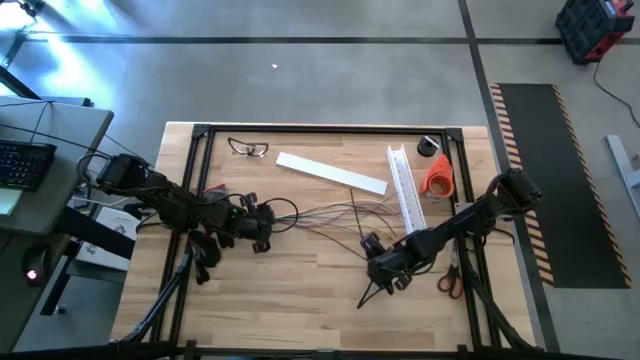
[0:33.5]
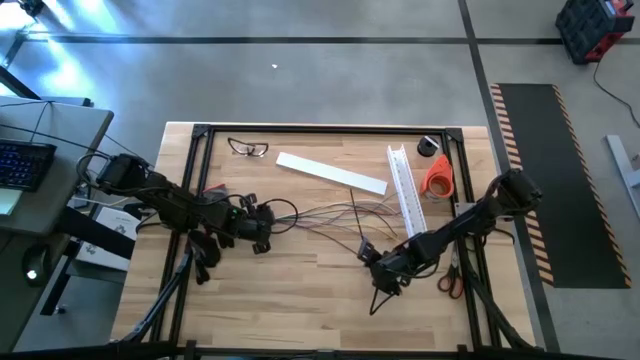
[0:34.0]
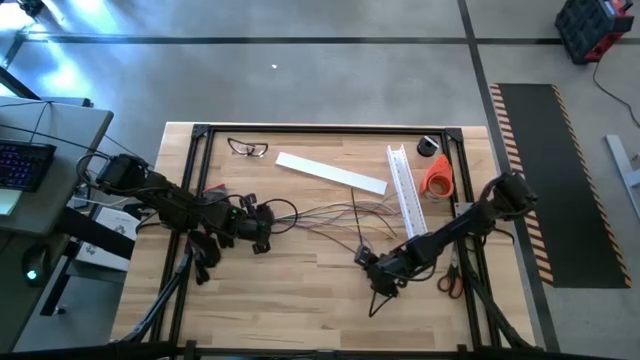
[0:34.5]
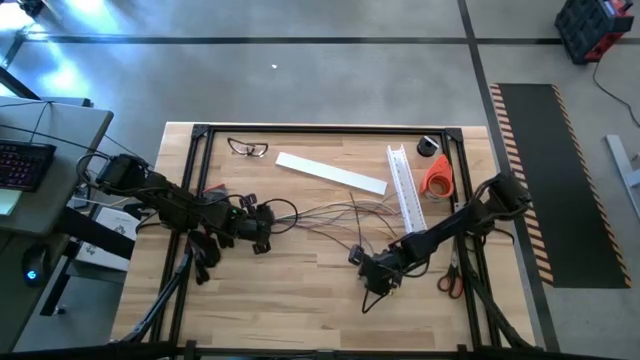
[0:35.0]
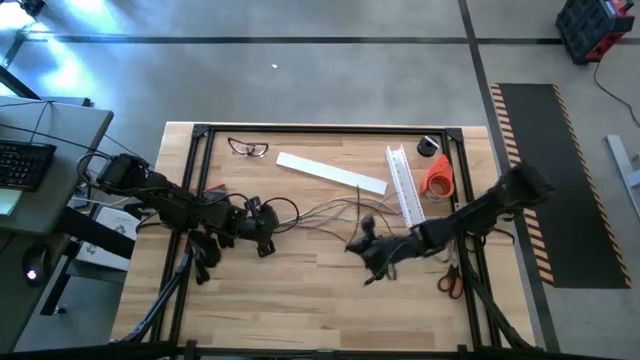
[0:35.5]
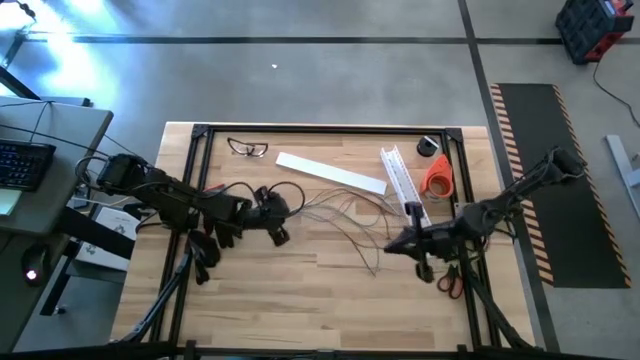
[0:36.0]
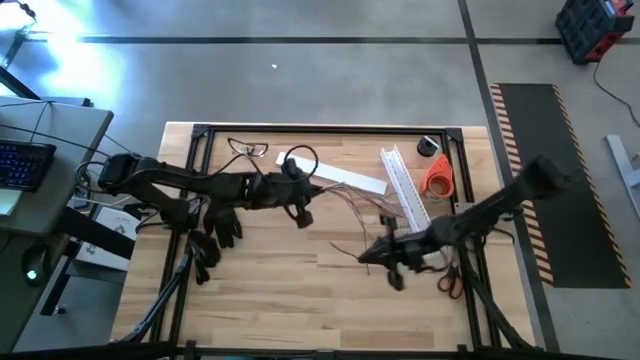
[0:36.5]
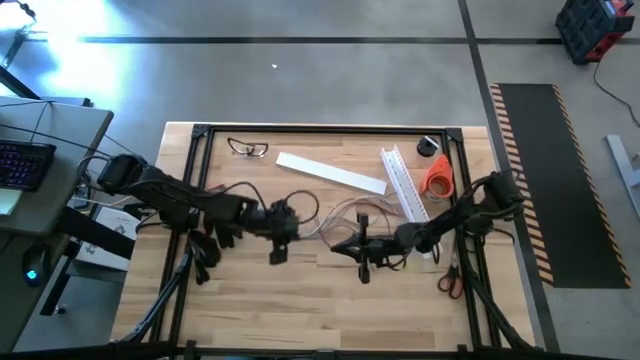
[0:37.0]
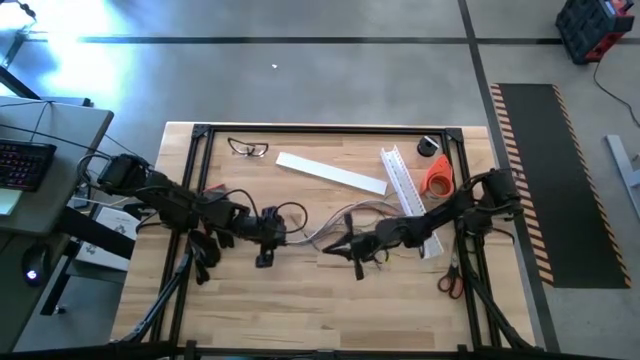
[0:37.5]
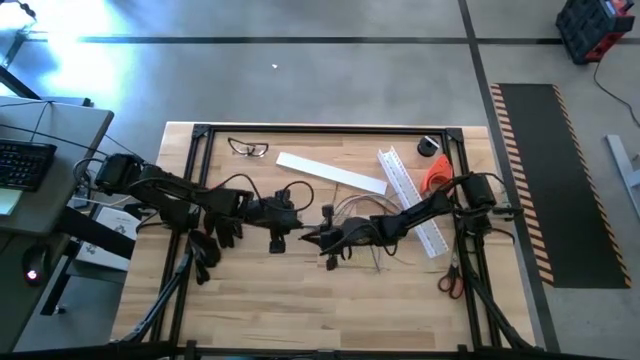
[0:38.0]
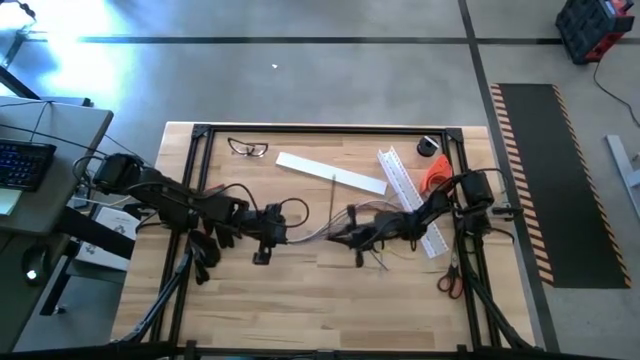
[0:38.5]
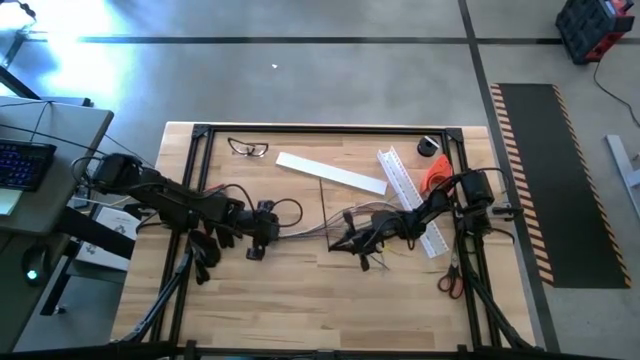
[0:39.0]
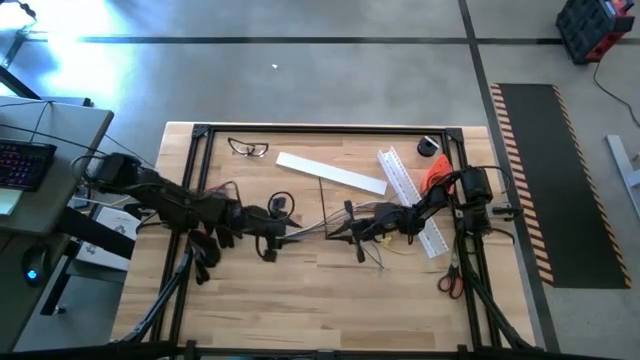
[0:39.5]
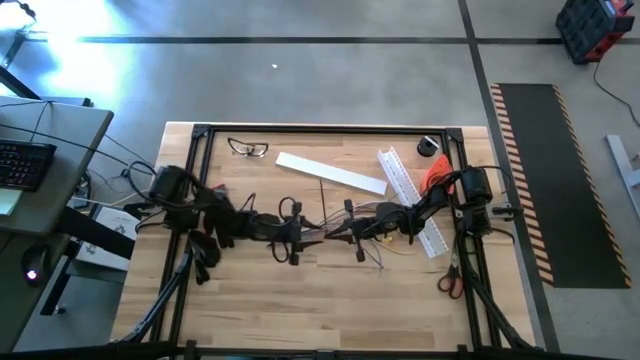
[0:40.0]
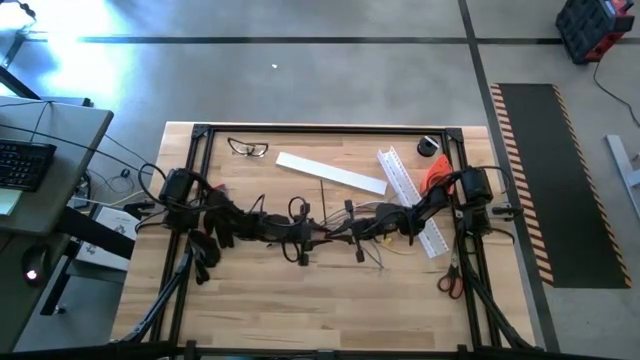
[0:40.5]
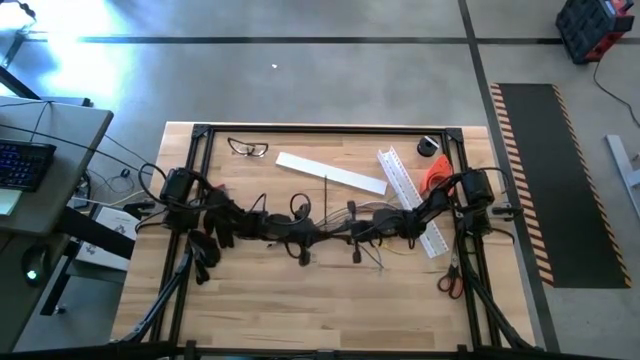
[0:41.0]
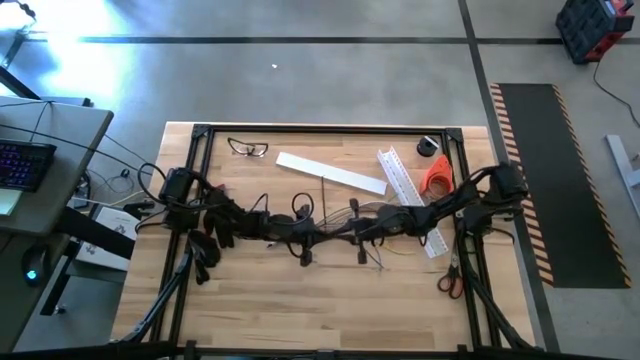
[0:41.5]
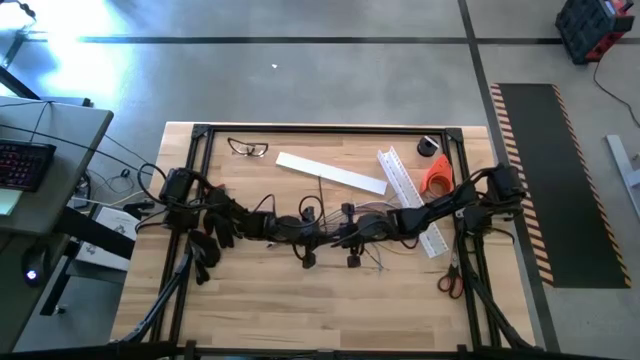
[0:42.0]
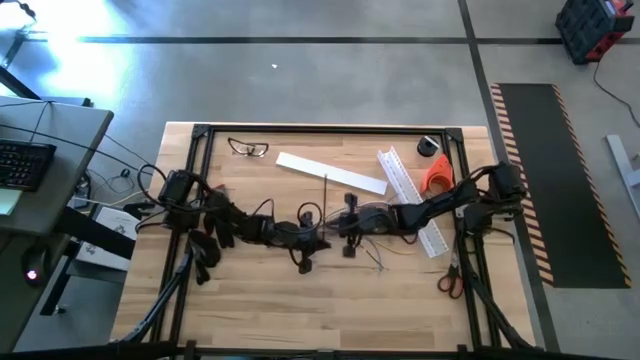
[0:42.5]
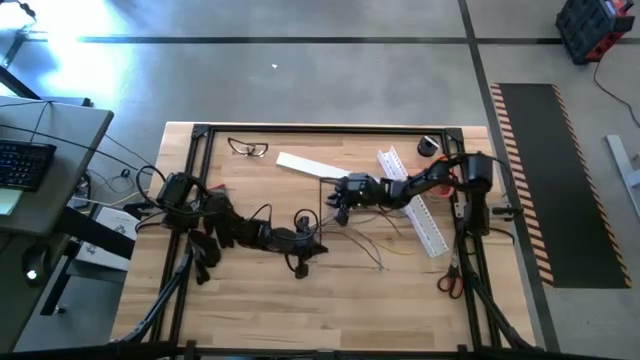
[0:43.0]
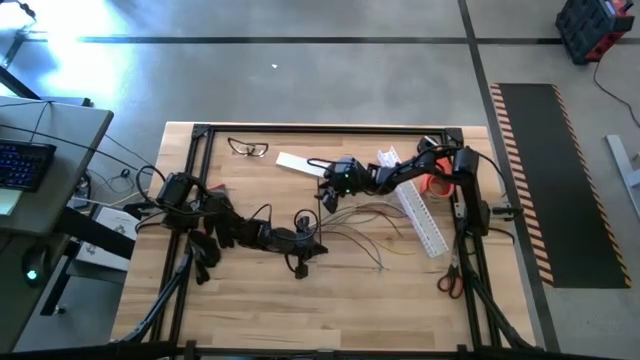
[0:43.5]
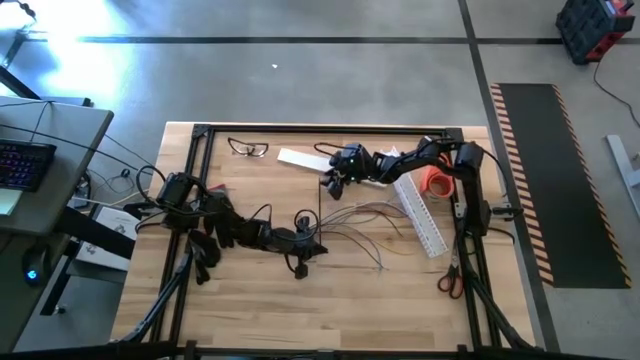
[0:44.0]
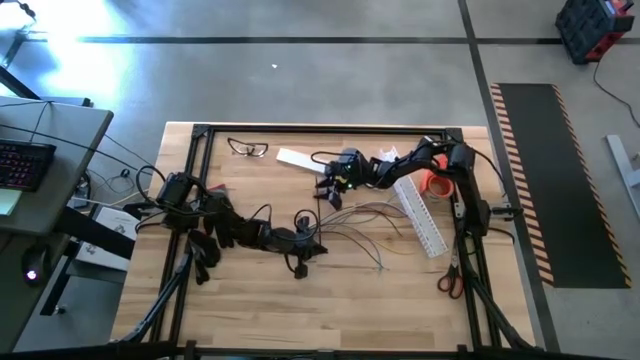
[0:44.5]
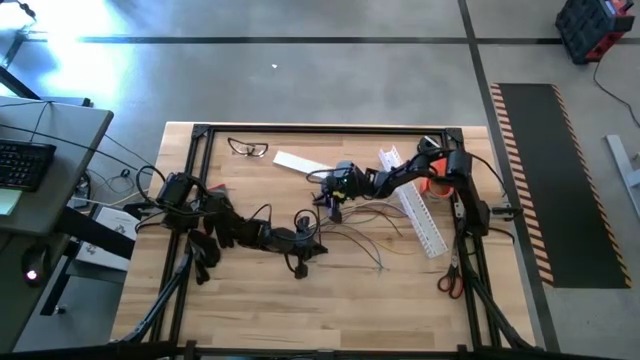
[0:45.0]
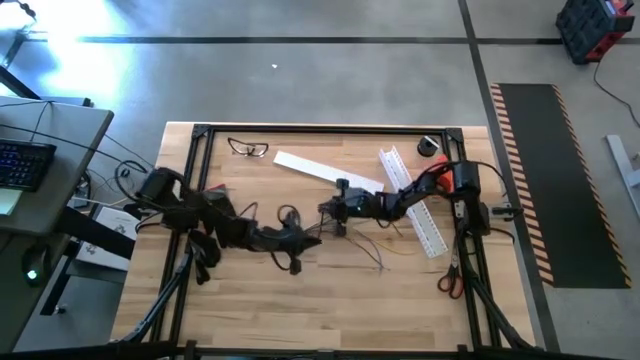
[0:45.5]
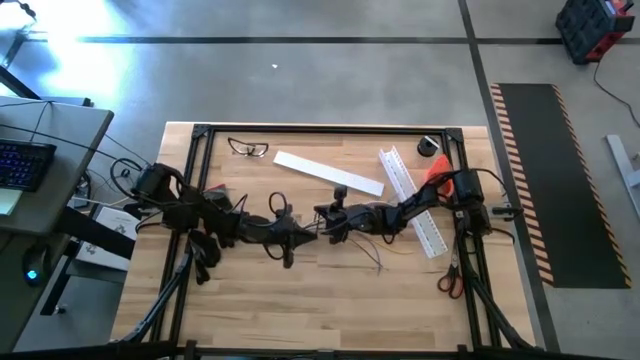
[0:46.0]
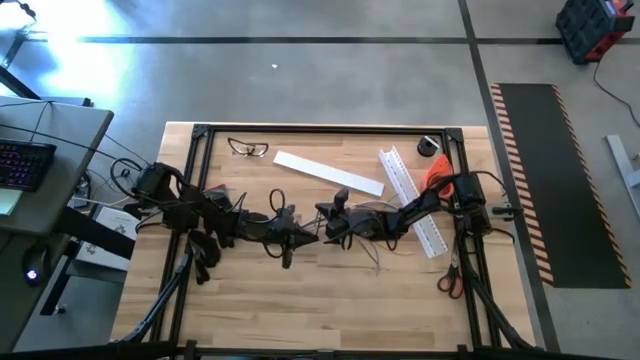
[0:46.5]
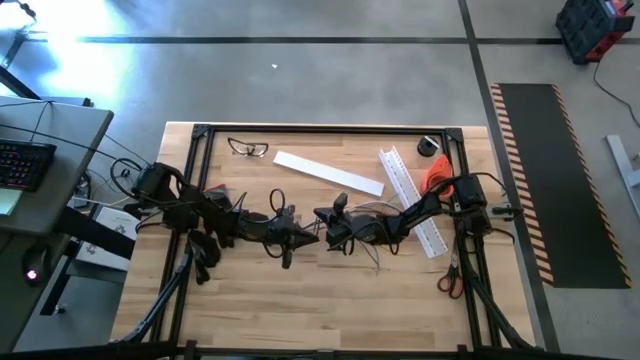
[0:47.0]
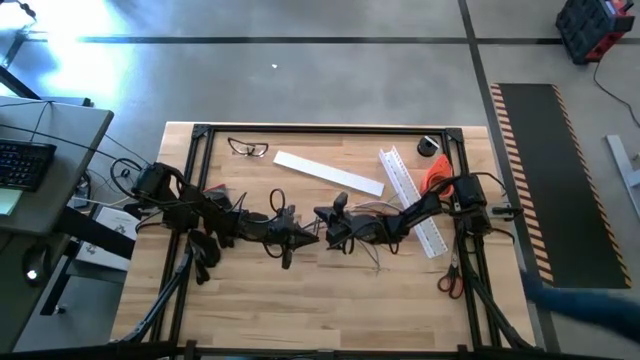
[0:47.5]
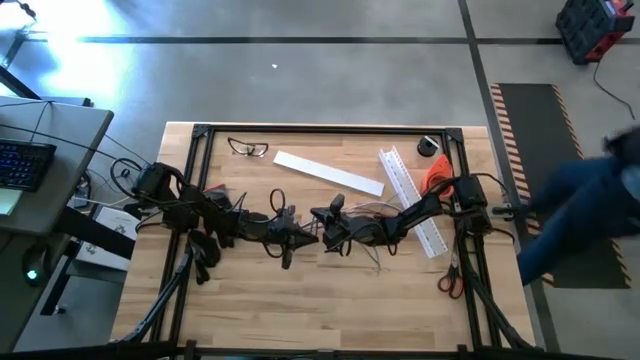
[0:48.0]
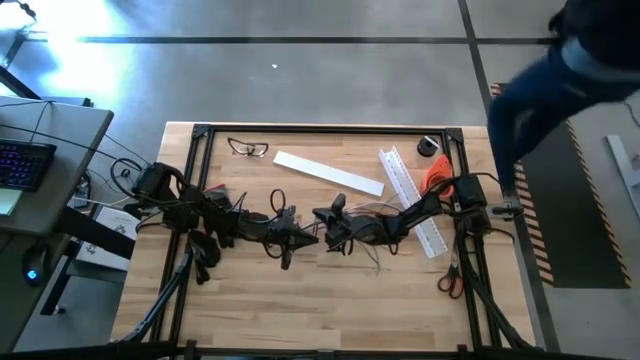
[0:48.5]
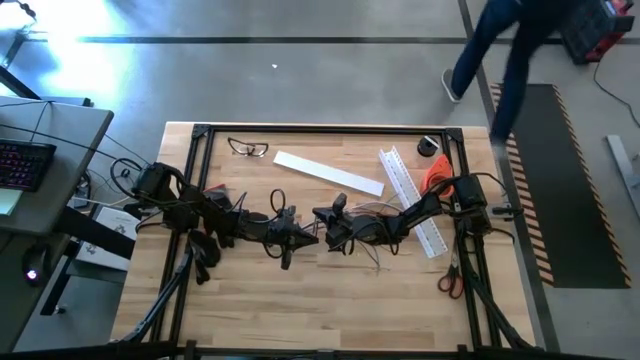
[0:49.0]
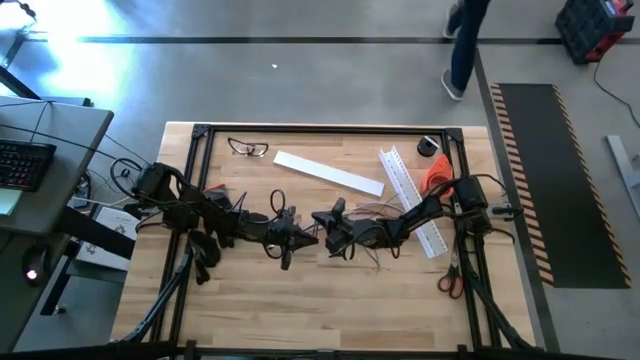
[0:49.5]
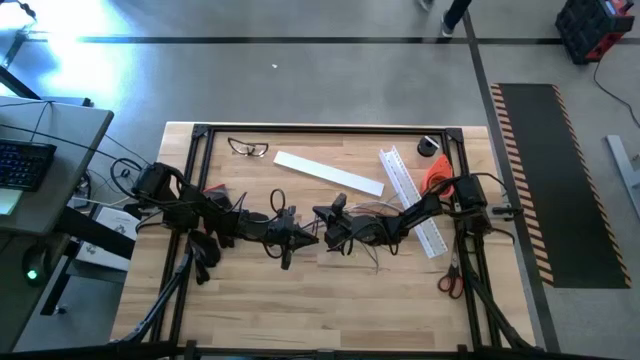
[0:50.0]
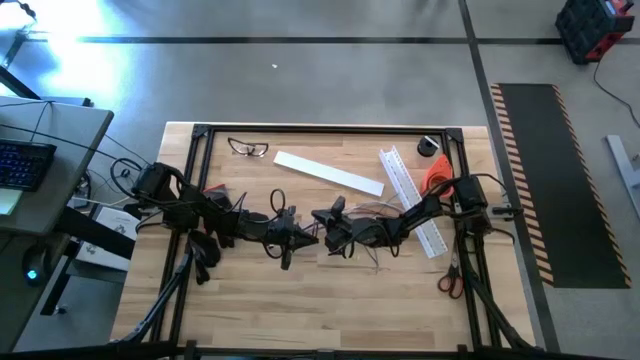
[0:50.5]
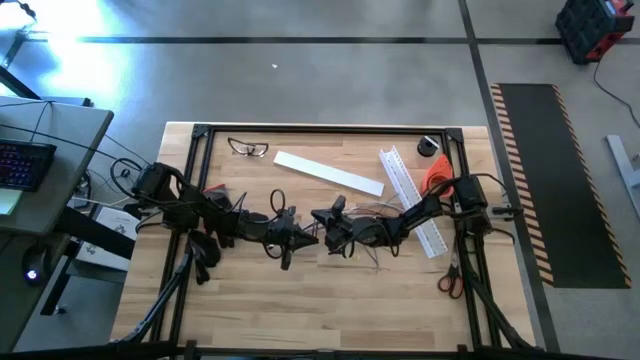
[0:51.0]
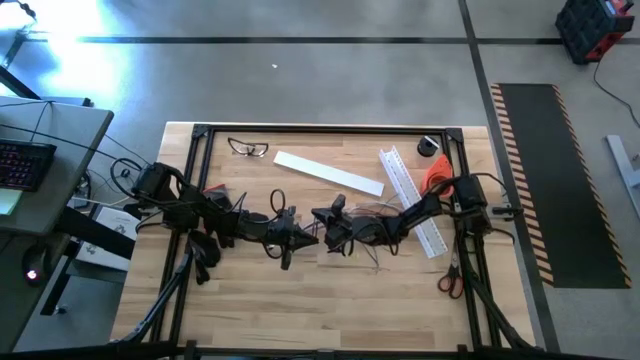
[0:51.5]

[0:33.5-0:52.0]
Task: Ziptie cables
Wrap the cables using a zip tie

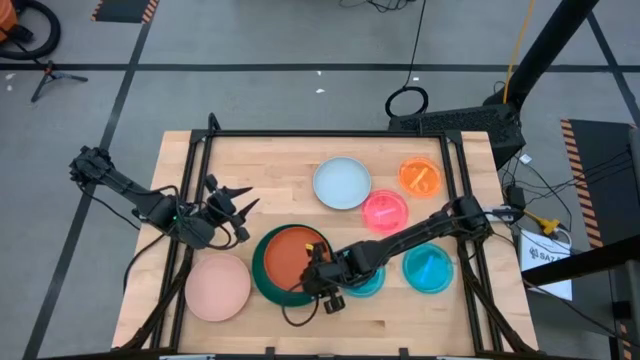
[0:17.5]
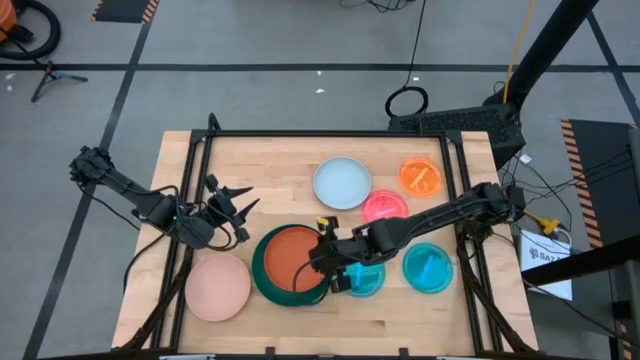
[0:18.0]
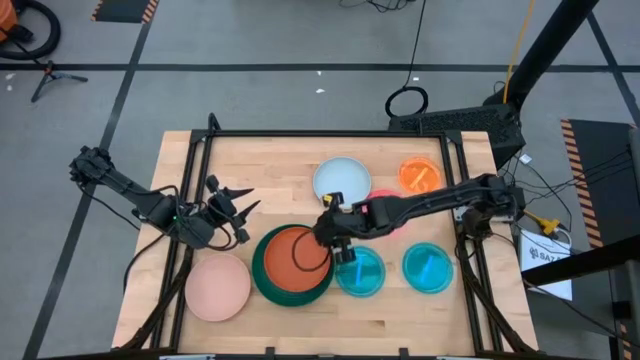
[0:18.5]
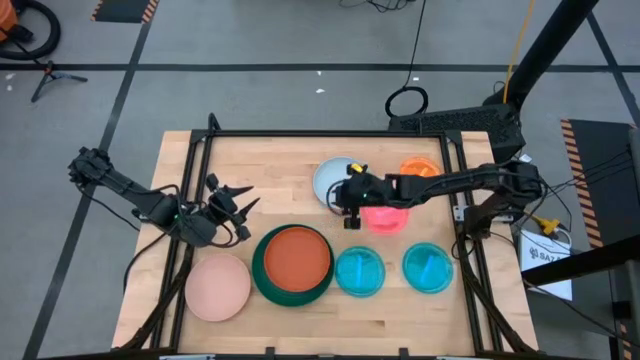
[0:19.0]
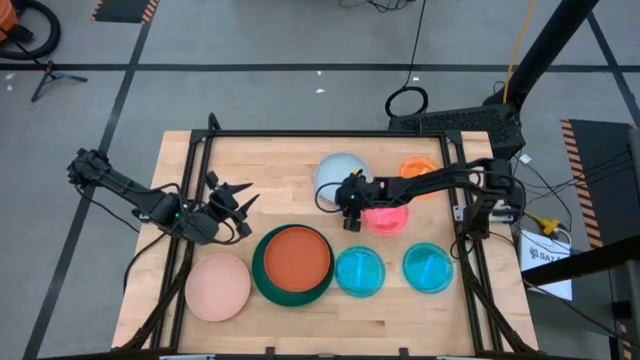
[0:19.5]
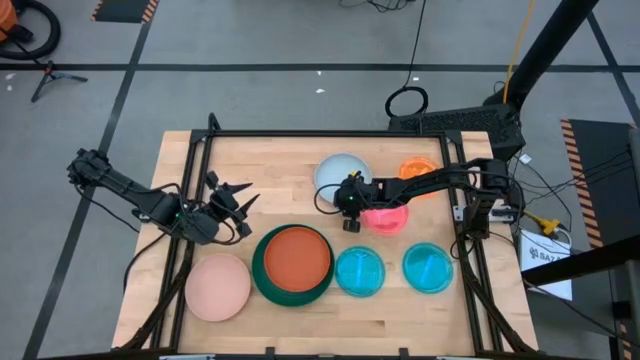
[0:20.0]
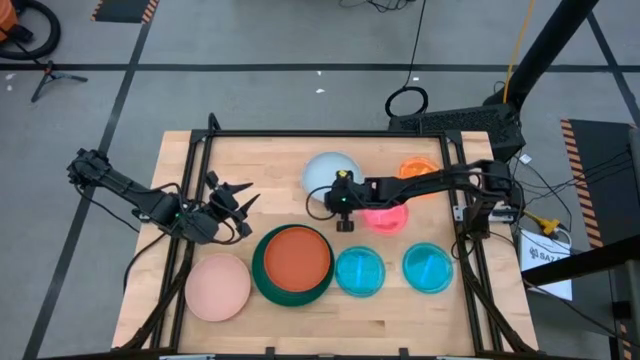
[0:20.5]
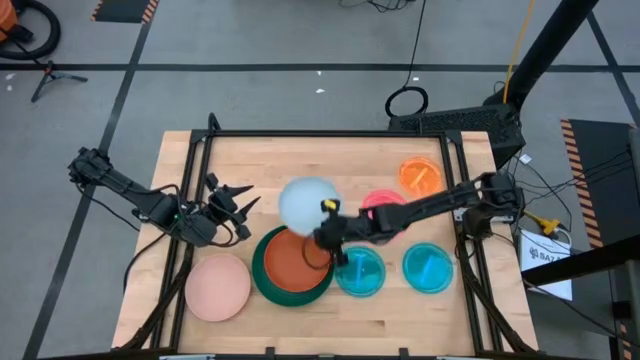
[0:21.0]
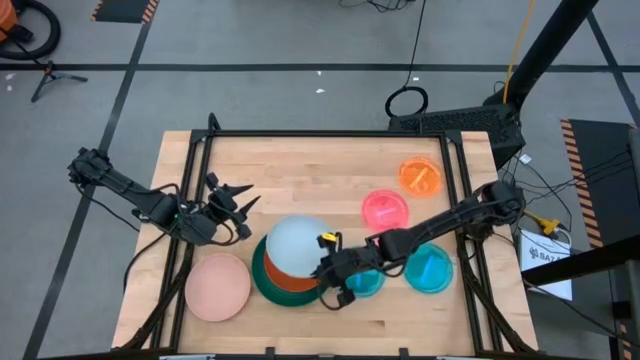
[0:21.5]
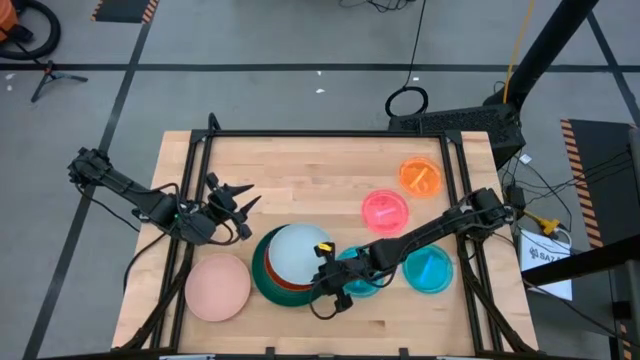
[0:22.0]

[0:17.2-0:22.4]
Task: Stack plastic plates
Stack the light blue plate on top of the orange plate
